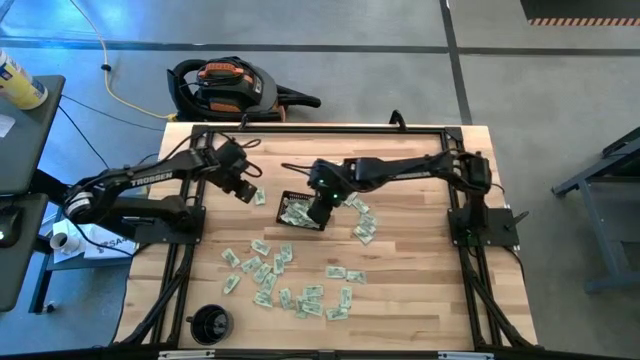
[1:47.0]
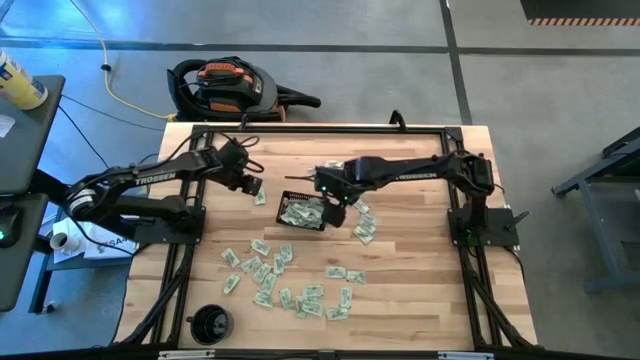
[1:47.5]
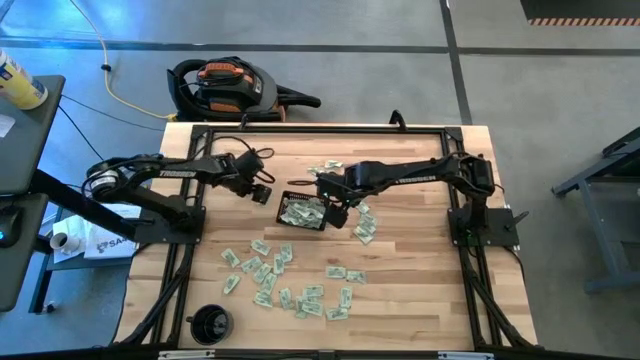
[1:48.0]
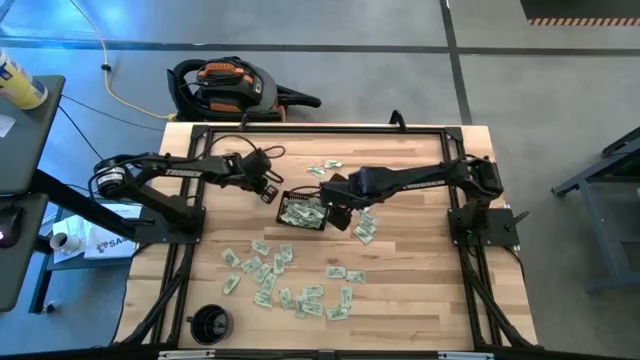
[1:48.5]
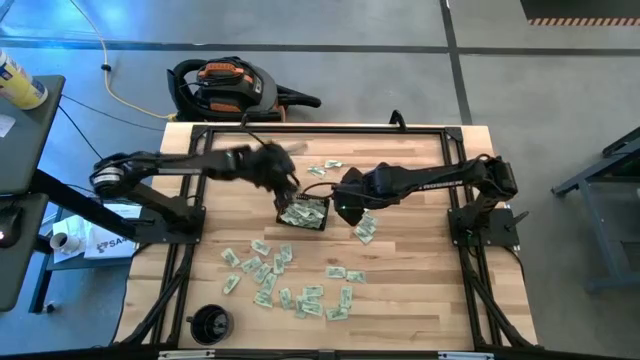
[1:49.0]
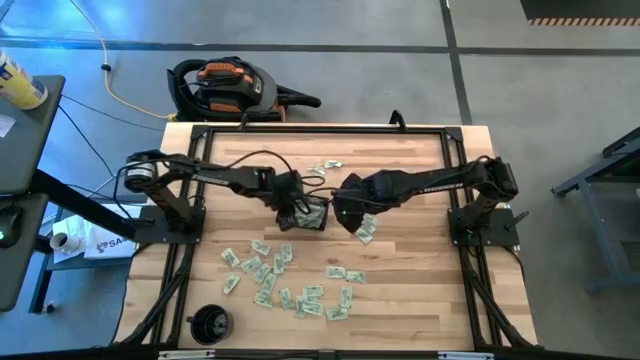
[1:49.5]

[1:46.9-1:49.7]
Task: Pick and place Stevia / Truvia into bins
Put the green stevia packet into the black basket

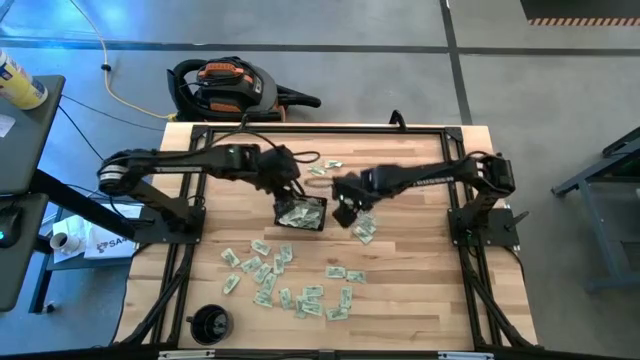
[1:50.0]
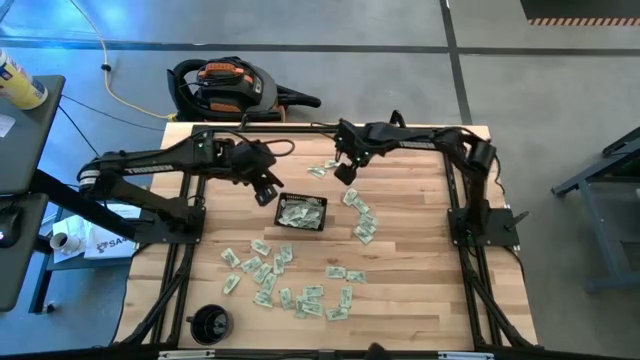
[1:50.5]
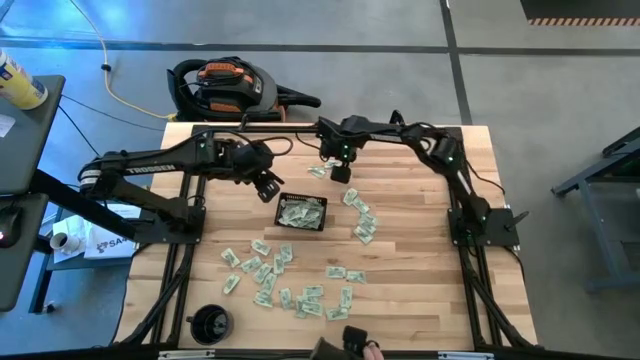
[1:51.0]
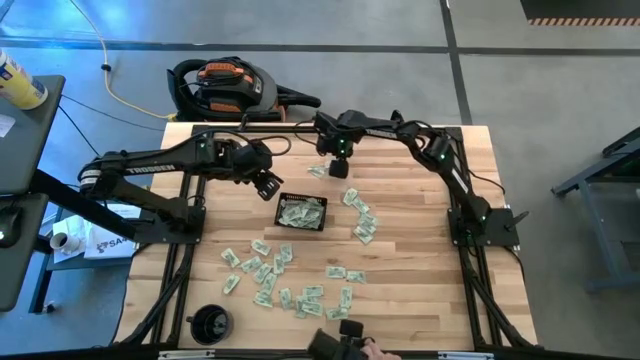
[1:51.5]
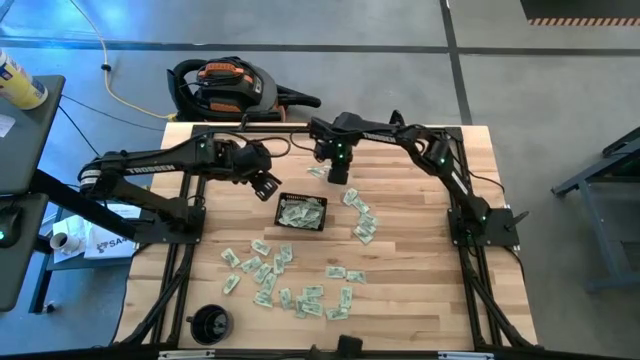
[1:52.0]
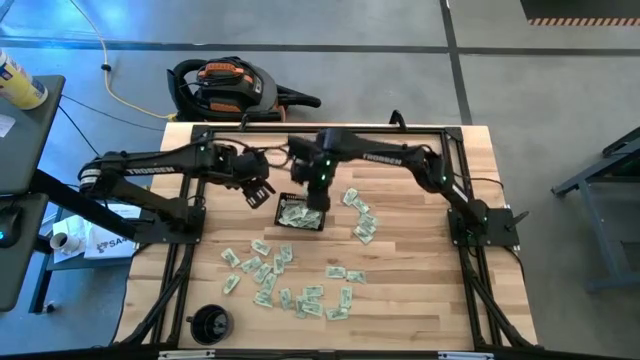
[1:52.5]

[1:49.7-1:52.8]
Put the green stevia packet into the black basket

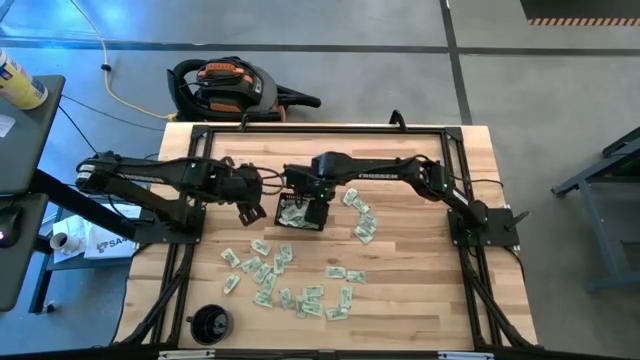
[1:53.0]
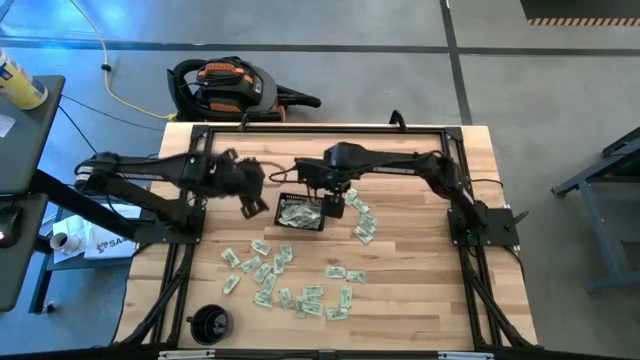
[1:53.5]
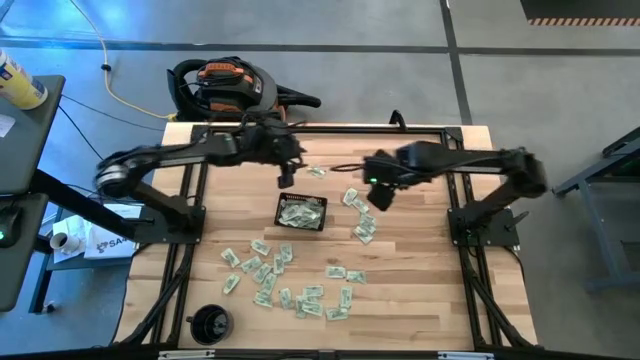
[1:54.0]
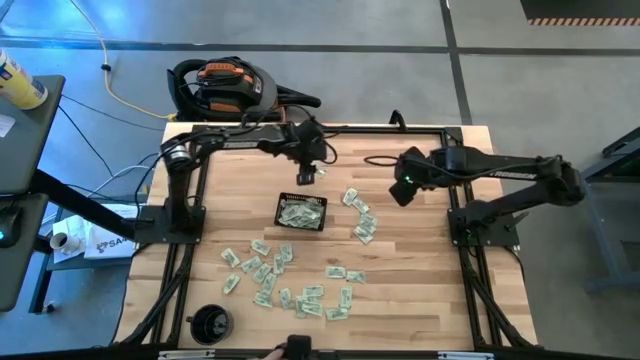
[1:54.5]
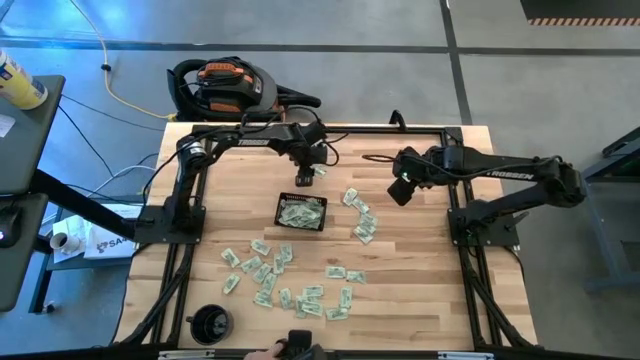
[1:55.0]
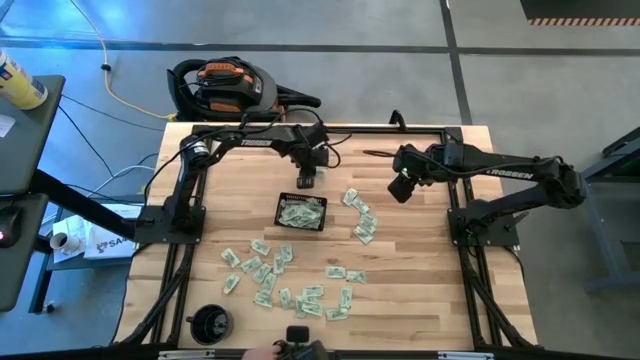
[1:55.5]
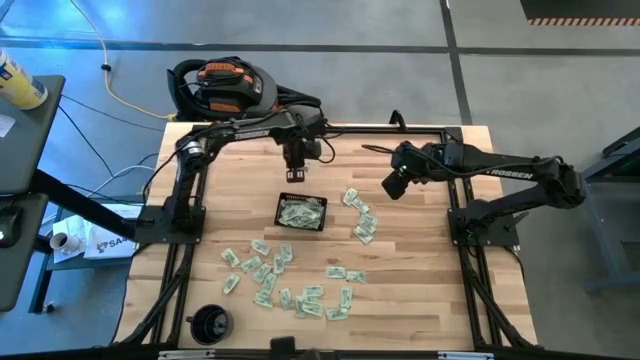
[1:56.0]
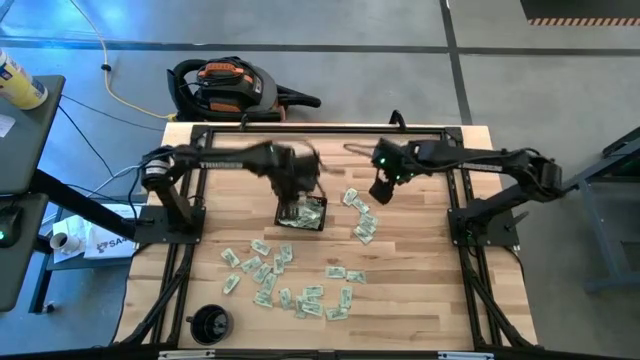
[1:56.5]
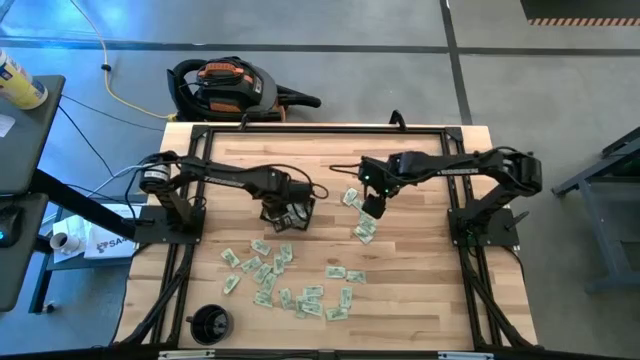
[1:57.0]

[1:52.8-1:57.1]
Put the green stevia packet into the black basket

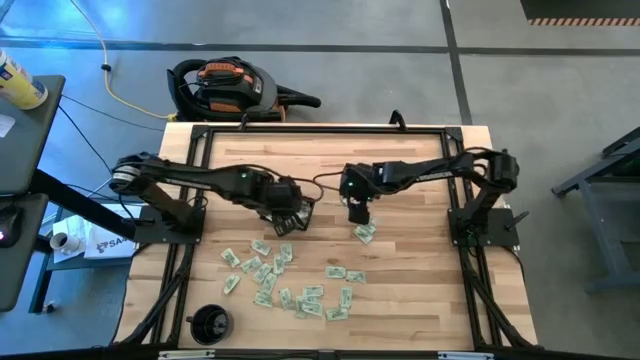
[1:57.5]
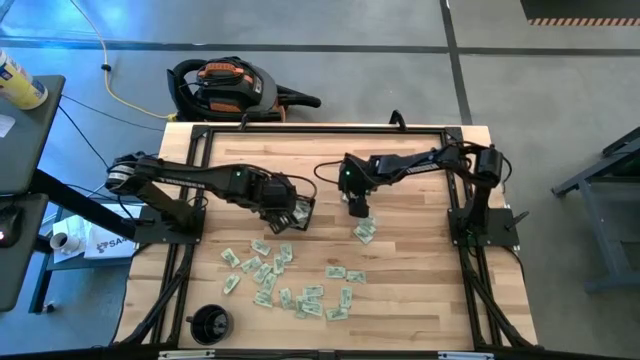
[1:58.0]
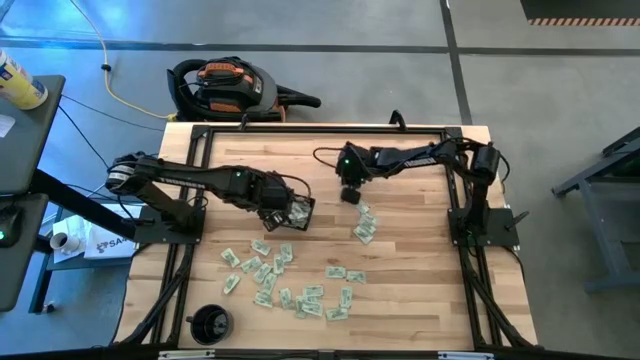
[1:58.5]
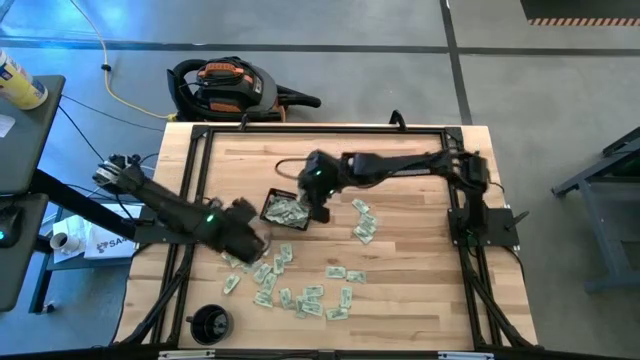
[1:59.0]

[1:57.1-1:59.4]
Put the green stevia packet into the black basket

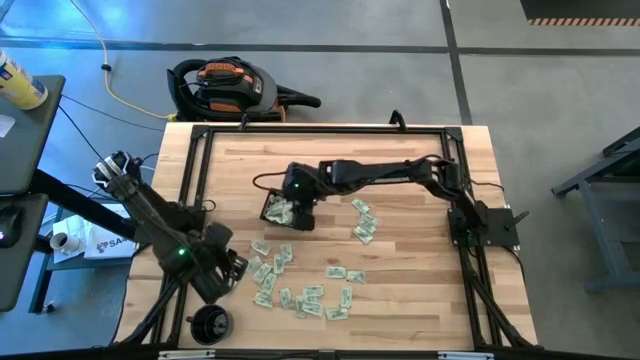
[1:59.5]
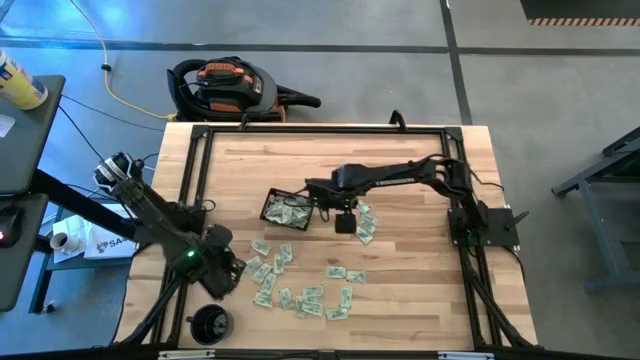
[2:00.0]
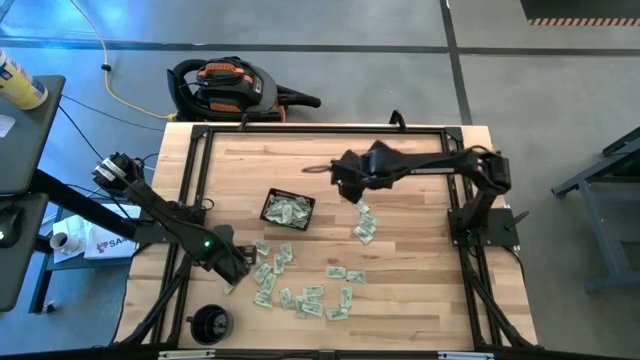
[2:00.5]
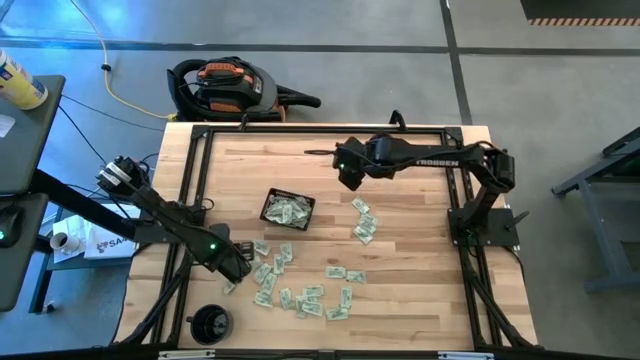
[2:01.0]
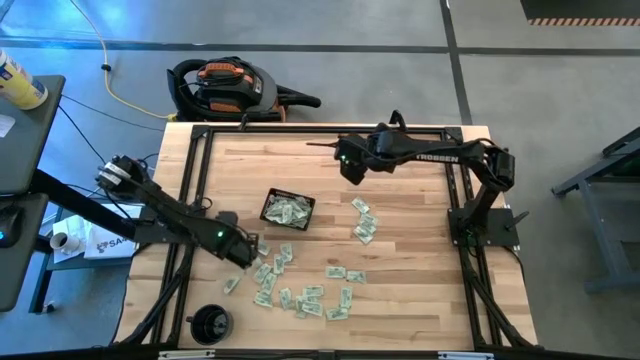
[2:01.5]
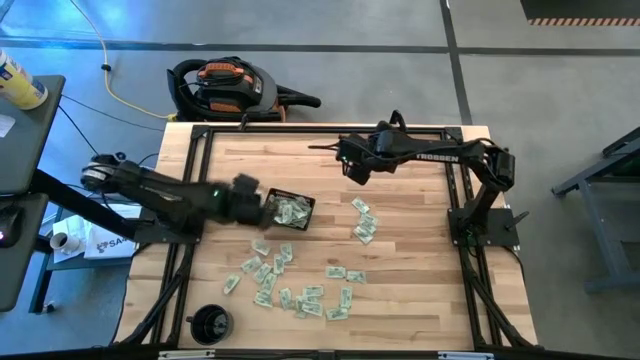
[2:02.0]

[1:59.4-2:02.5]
Put the green stevia packet into the black basket

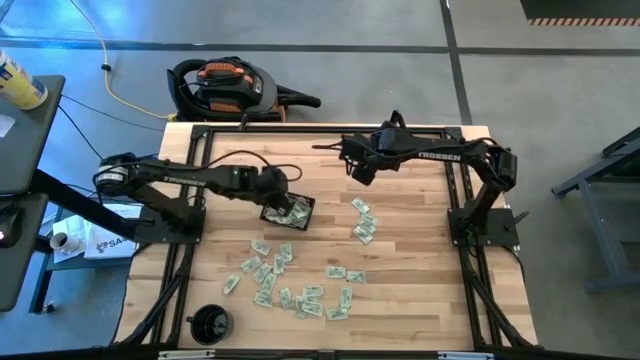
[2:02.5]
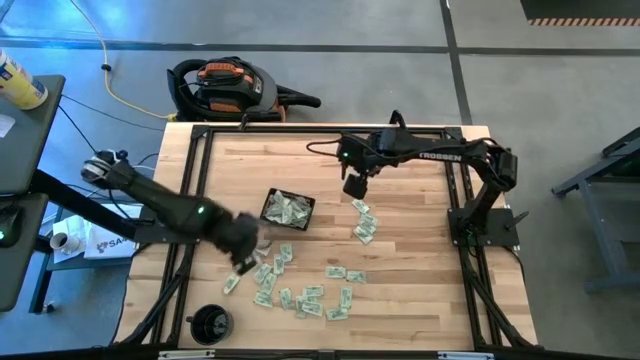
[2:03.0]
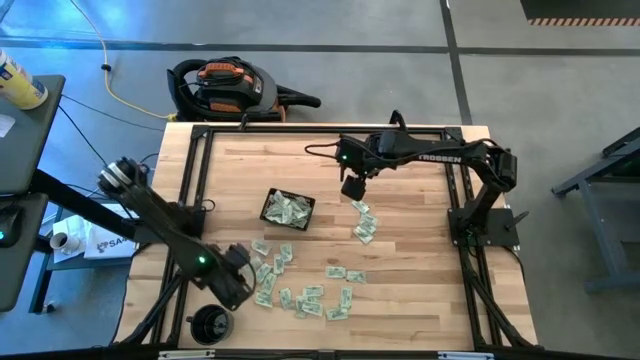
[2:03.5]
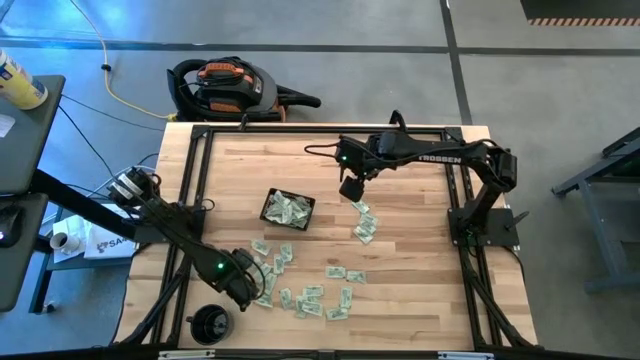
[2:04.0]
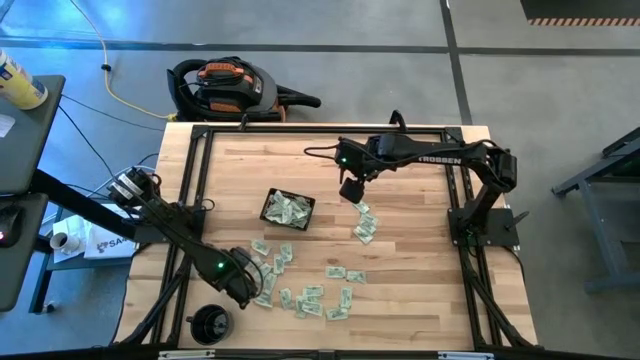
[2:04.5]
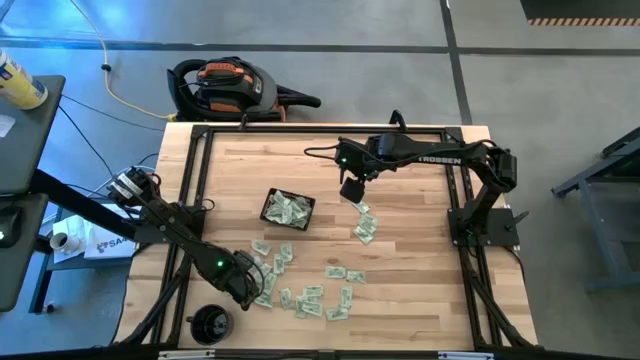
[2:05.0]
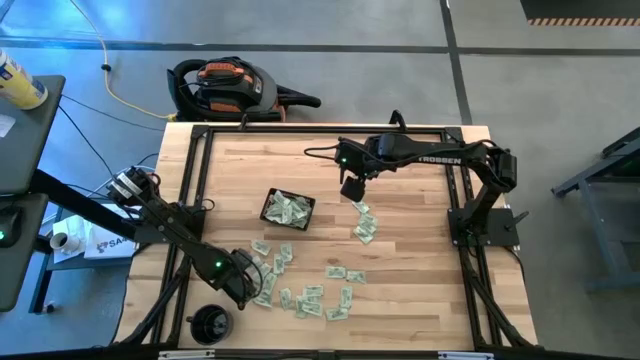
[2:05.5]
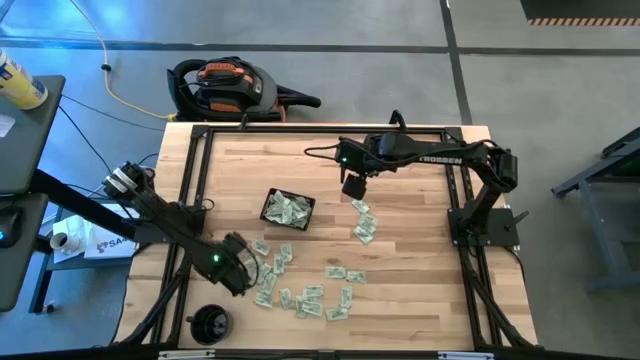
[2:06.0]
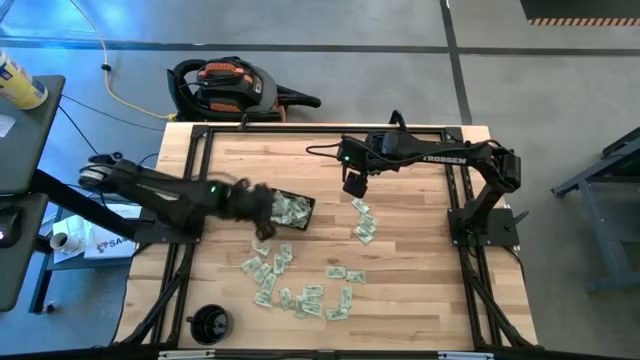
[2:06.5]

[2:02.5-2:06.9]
Put the green stevia packet into the black basket

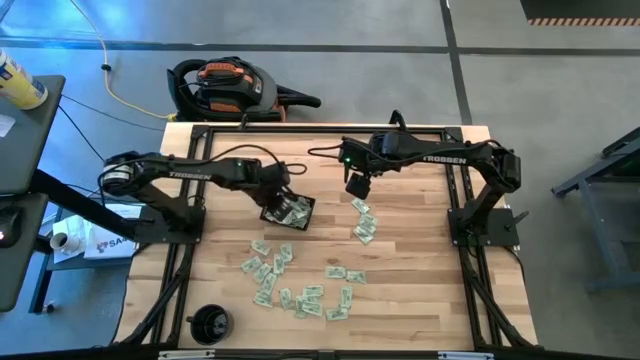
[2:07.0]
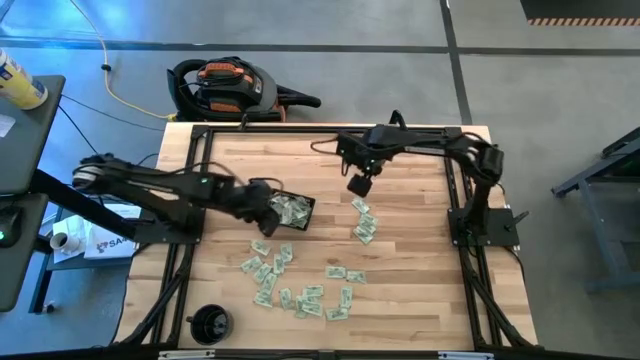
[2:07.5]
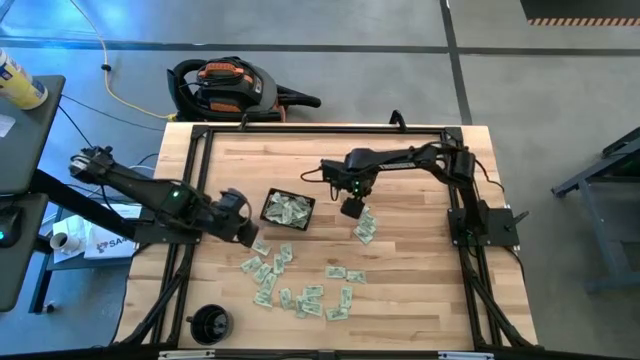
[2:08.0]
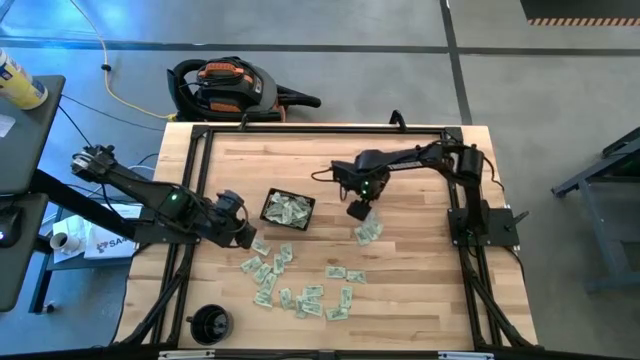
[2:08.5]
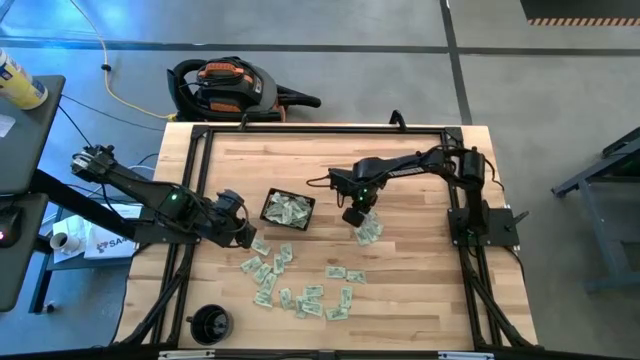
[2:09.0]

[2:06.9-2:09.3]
Put the green stevia packet into the black basket
